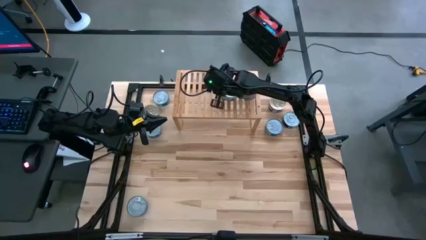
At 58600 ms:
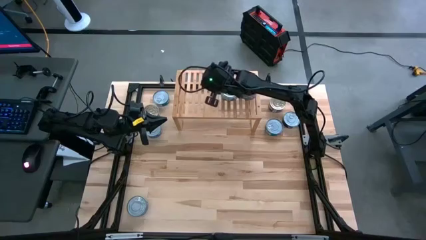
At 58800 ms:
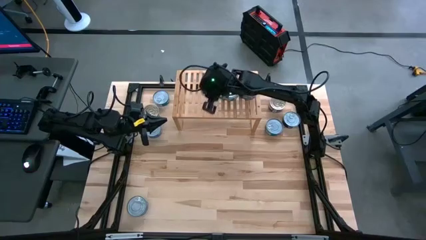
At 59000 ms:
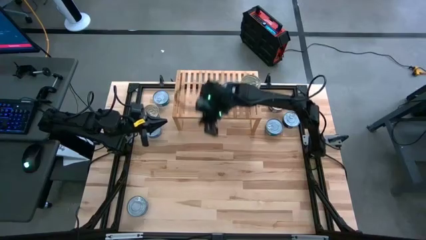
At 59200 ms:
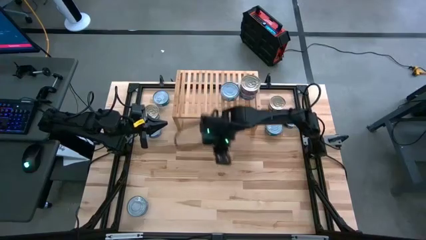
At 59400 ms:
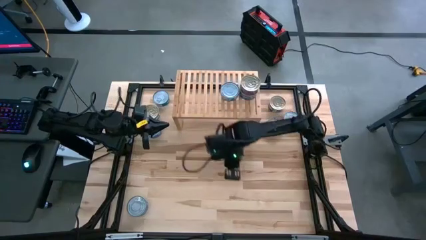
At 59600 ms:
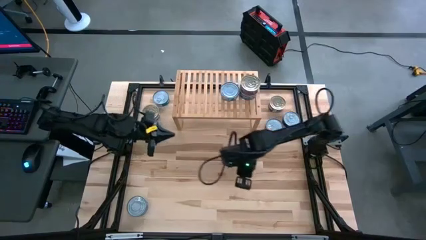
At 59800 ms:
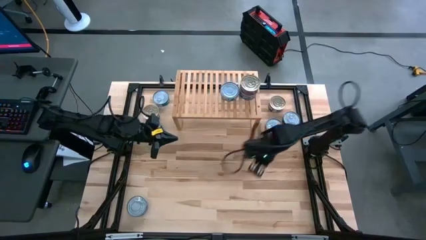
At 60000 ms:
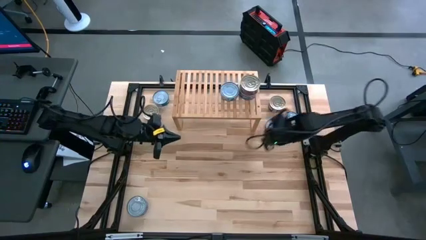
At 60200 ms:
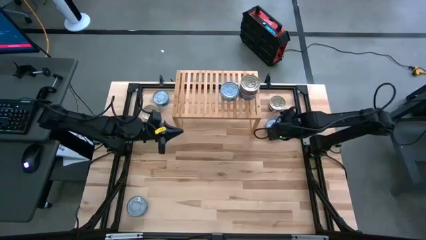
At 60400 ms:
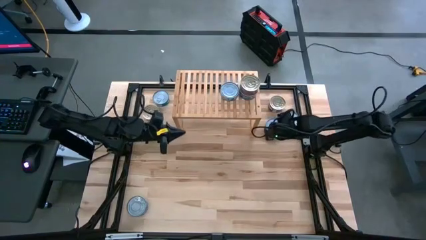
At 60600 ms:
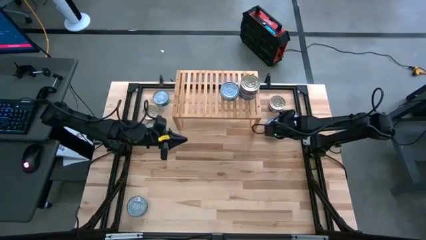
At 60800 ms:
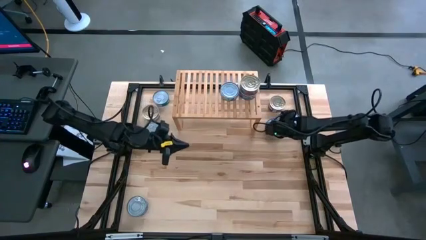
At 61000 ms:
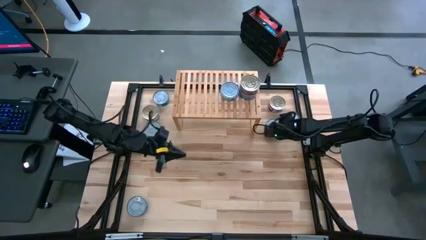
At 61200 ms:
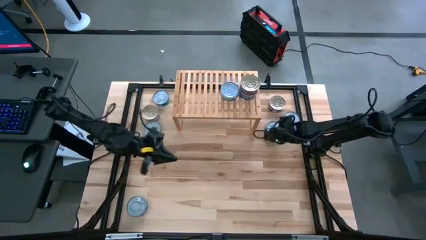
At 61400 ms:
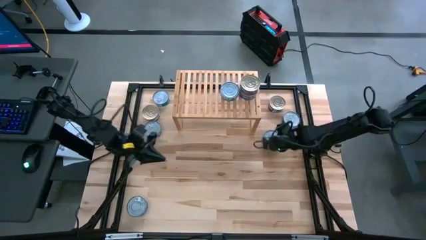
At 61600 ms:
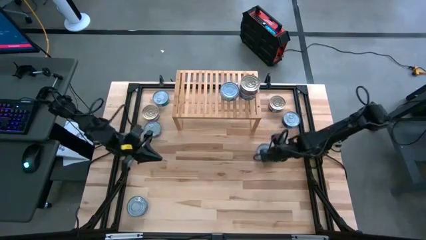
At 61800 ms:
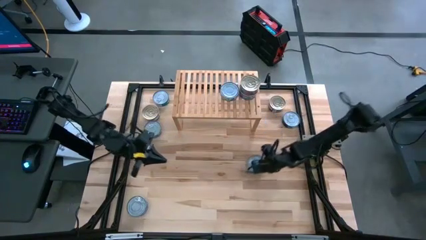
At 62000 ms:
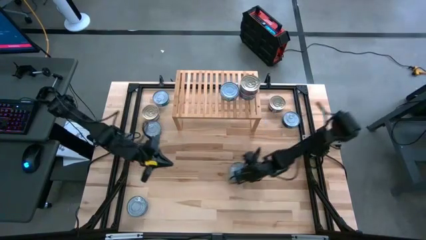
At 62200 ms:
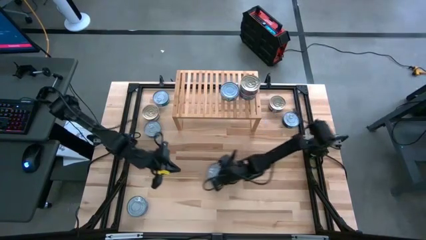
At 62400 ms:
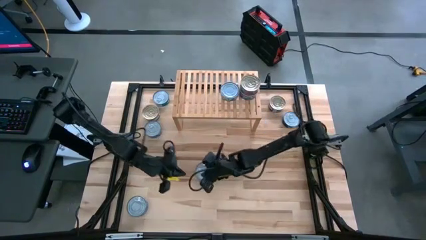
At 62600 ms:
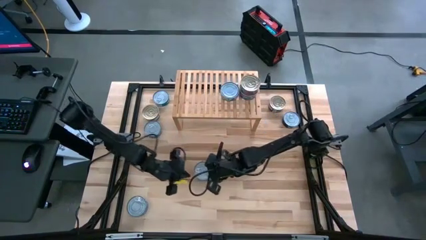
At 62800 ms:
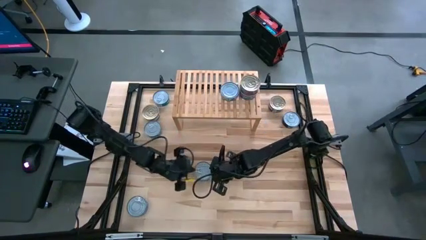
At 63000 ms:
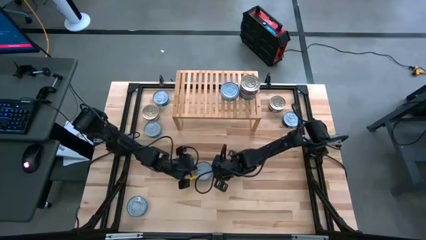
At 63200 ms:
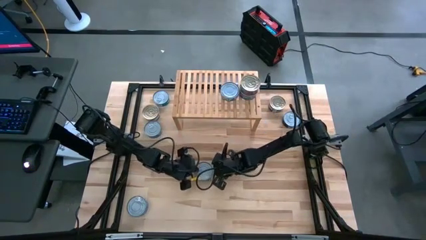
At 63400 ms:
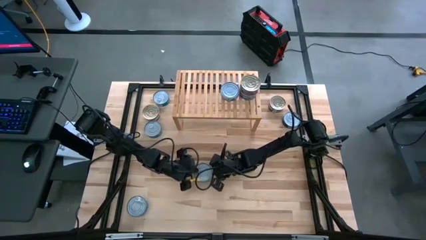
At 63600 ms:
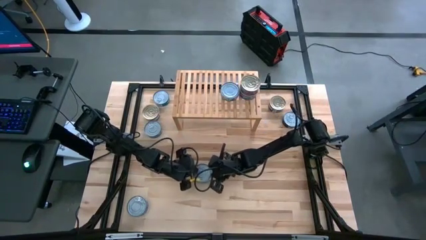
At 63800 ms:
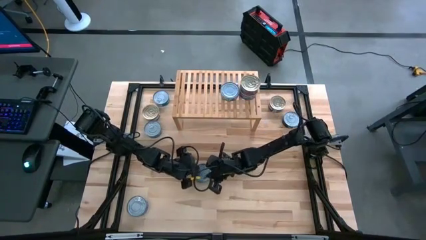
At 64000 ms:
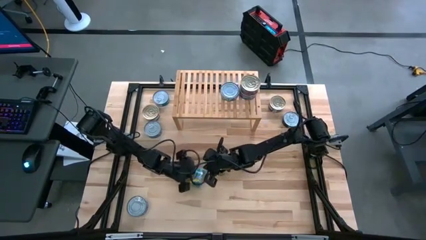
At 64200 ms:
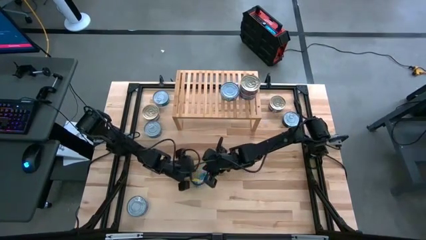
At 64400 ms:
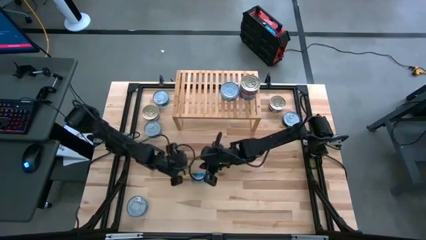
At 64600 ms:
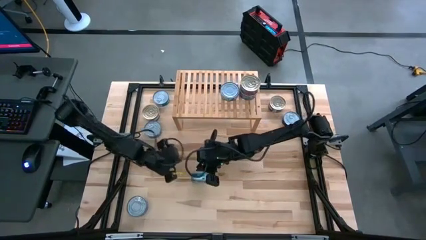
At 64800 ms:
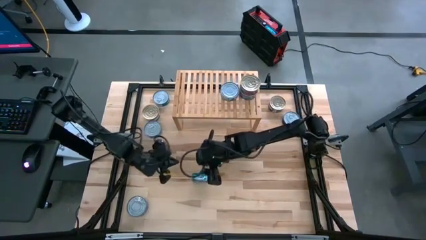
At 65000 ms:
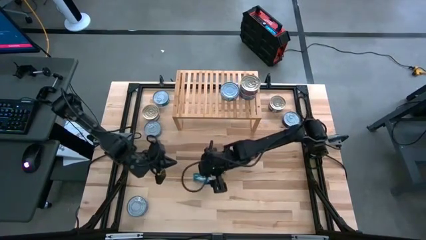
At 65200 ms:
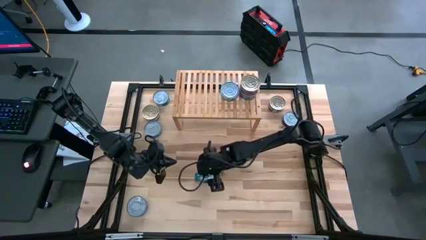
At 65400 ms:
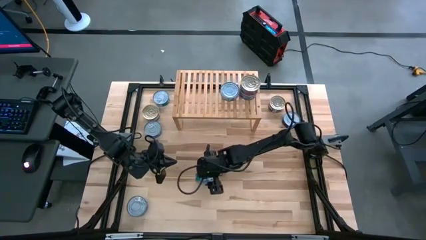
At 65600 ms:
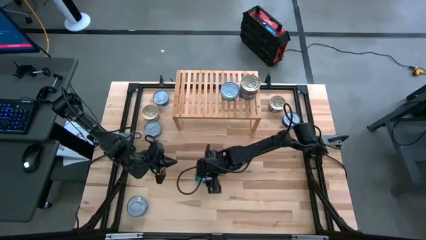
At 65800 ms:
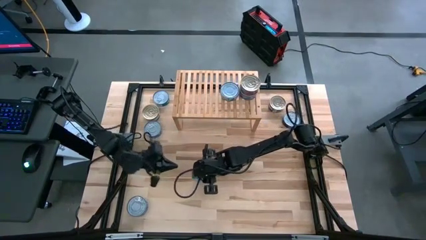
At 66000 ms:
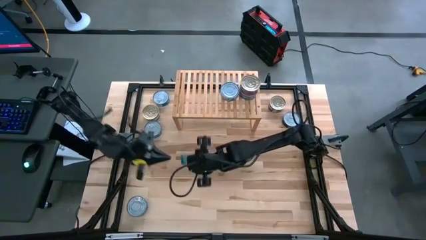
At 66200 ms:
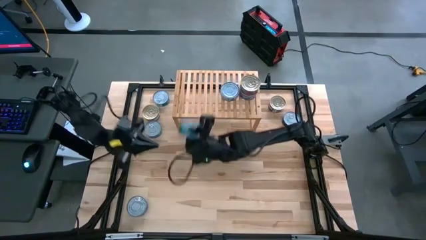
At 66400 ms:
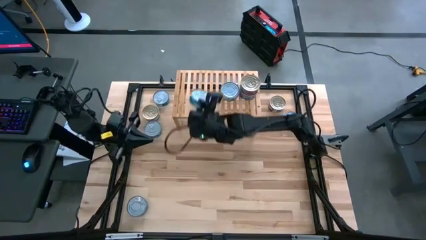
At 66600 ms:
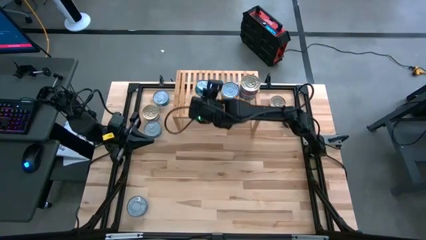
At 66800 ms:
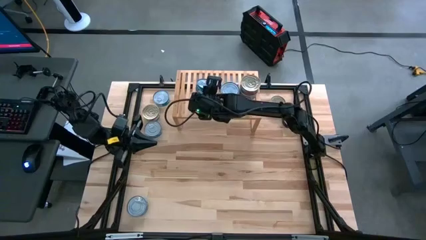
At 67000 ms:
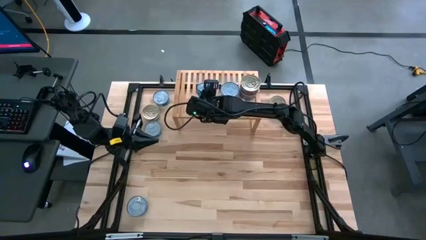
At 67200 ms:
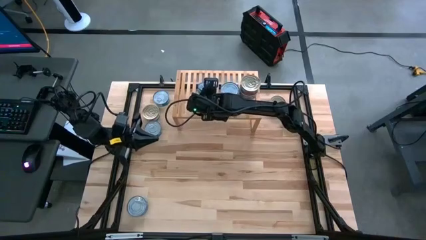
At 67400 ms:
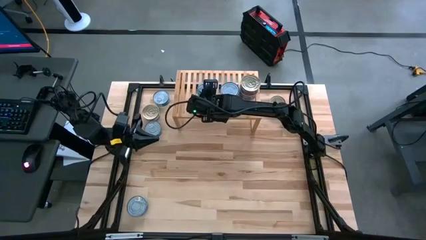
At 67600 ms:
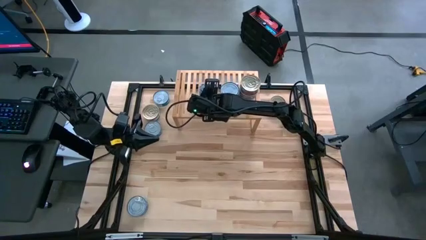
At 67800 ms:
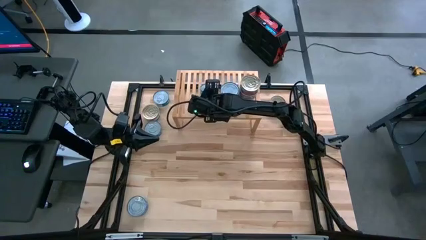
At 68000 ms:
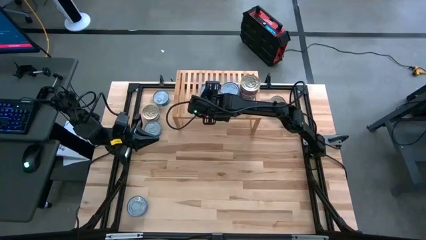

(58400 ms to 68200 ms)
Task: Stack canned seafood by type on shelf
Put the green-blue tuna can on the shelf

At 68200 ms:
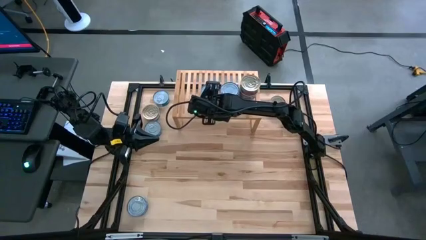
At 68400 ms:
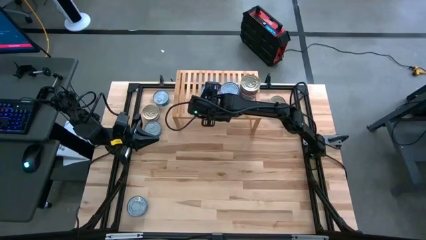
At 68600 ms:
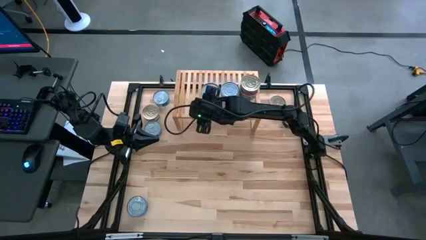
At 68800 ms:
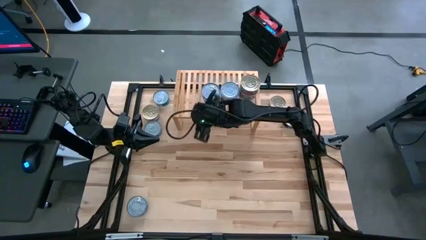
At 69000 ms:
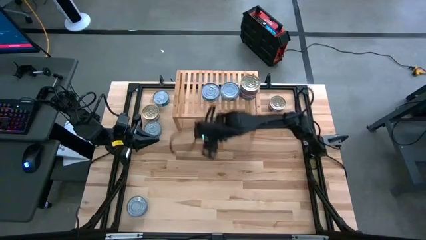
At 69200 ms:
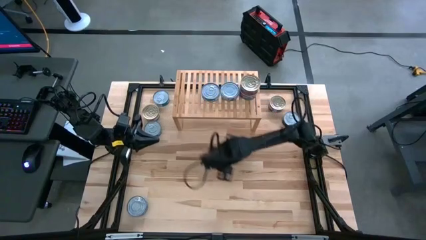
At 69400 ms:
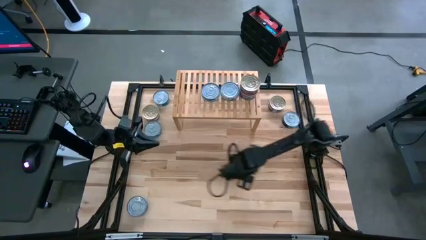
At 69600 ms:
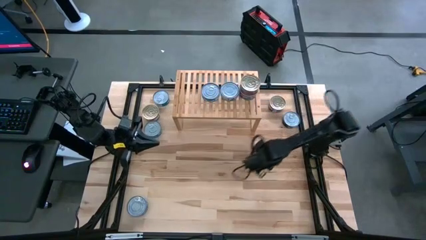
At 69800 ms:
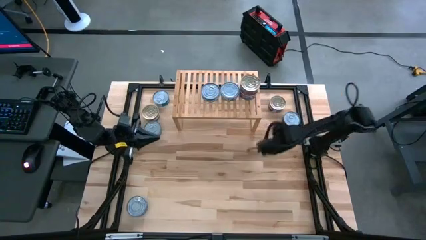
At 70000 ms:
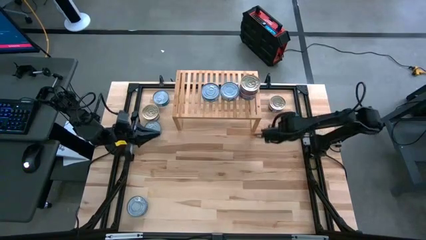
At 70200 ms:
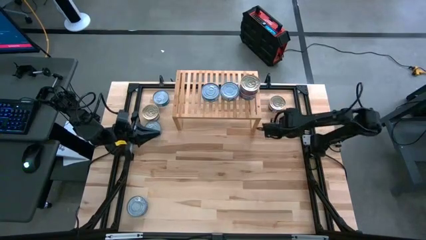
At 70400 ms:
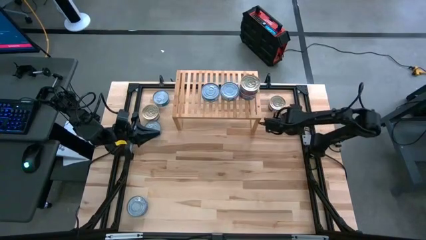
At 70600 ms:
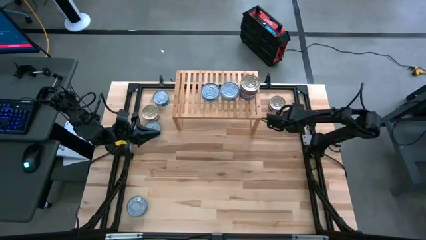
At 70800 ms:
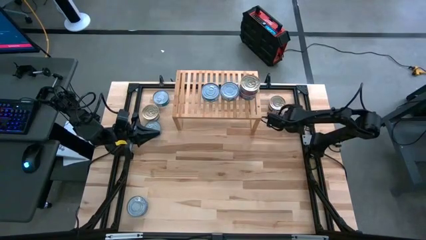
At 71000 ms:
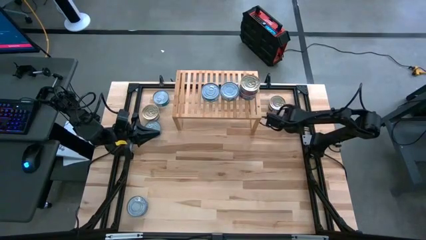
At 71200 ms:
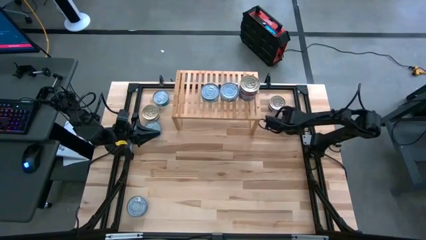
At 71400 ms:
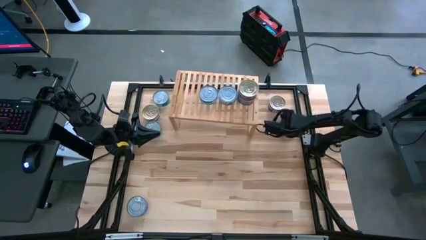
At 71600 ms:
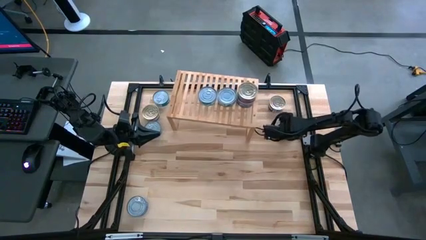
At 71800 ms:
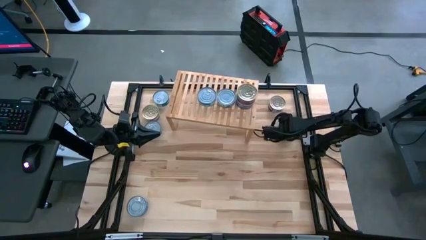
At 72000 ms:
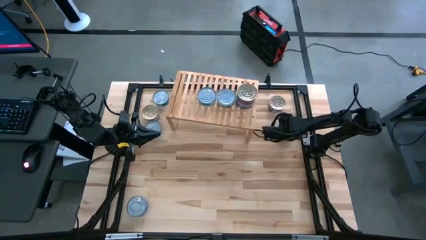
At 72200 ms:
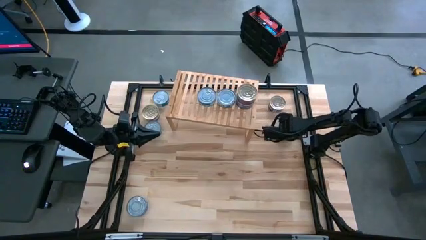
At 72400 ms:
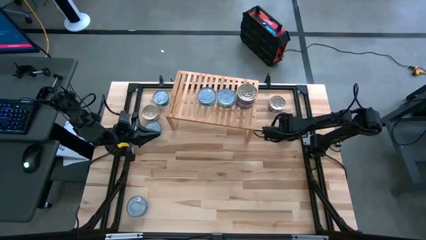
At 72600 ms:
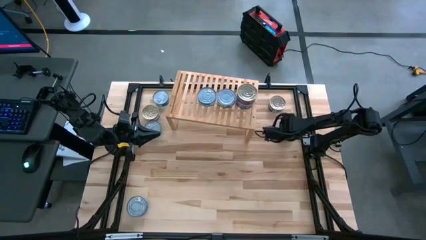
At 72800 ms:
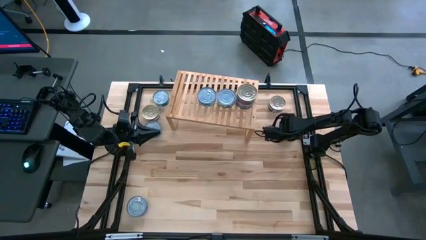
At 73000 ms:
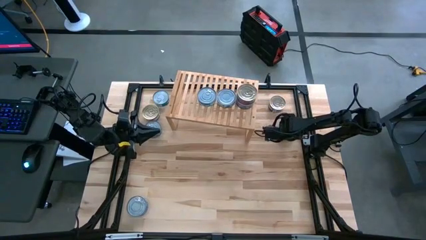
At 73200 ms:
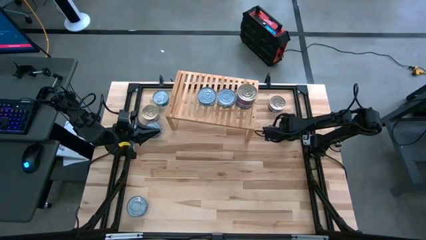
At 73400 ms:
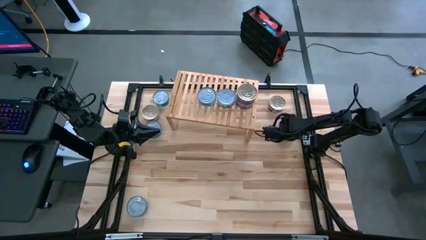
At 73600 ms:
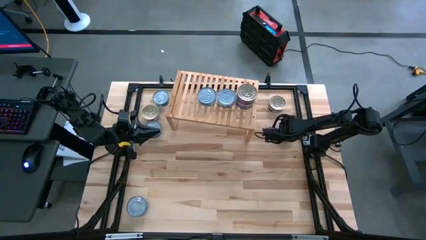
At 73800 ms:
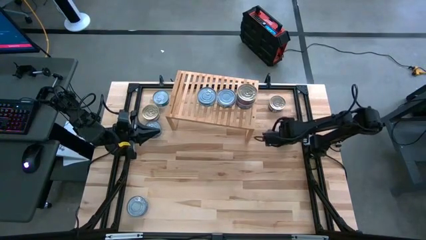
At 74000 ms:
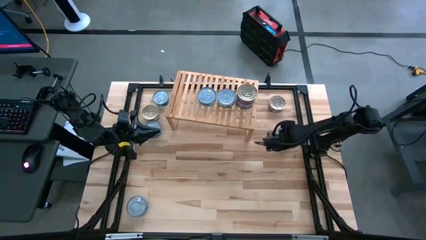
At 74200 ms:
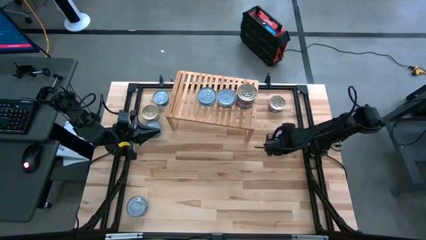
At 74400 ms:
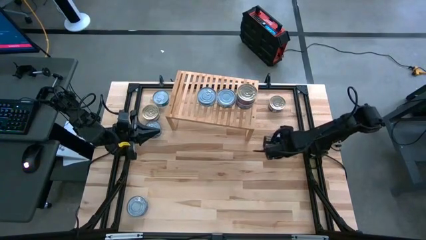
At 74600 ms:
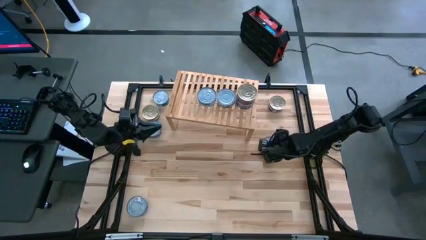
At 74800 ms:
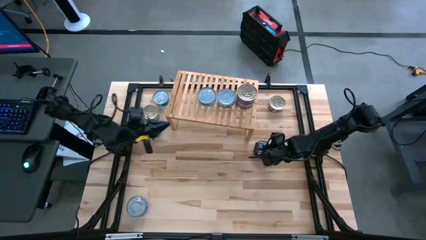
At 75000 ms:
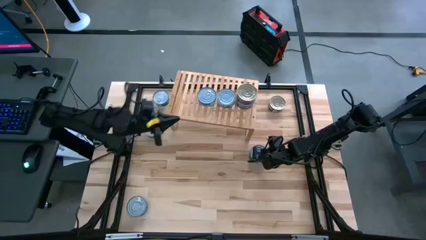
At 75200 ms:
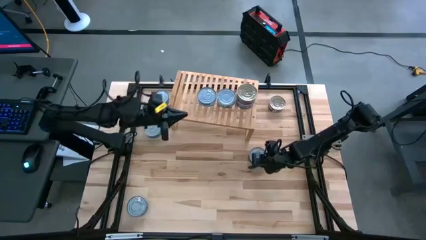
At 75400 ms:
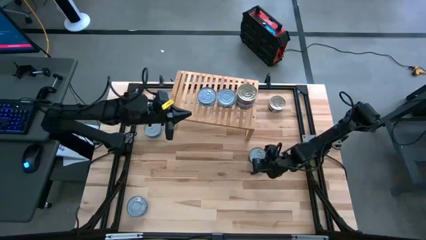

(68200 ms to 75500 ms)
Move the blue tuna can to the middle right of the table
